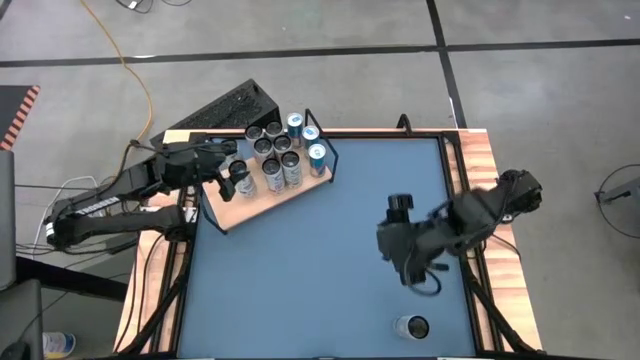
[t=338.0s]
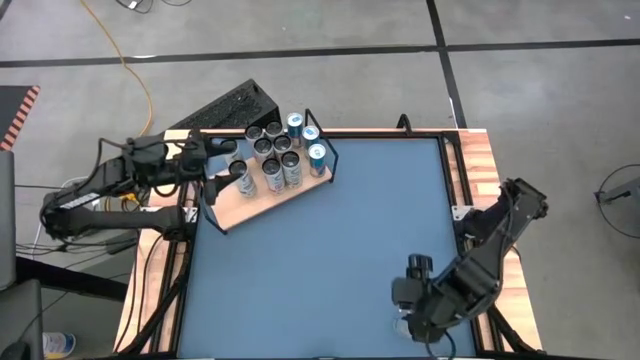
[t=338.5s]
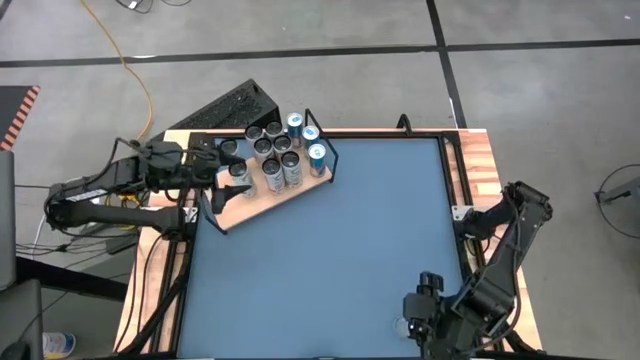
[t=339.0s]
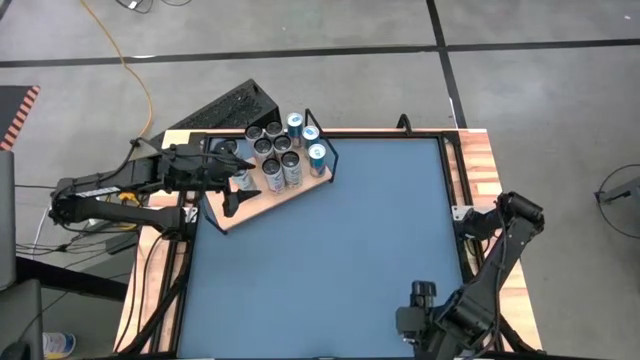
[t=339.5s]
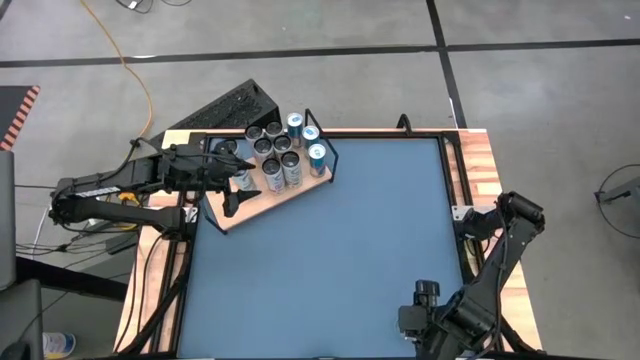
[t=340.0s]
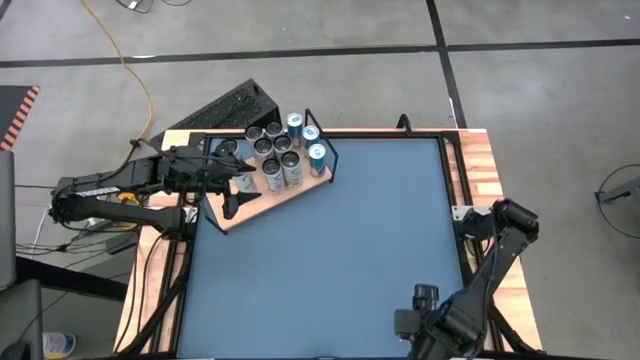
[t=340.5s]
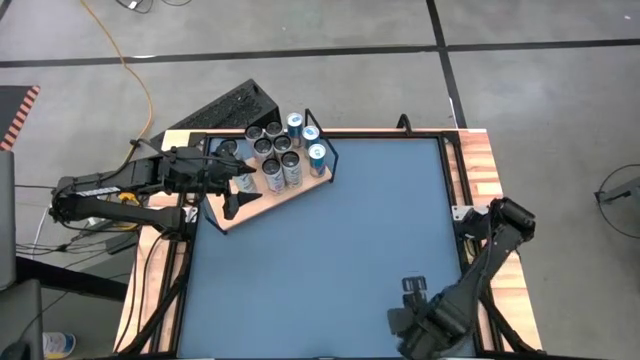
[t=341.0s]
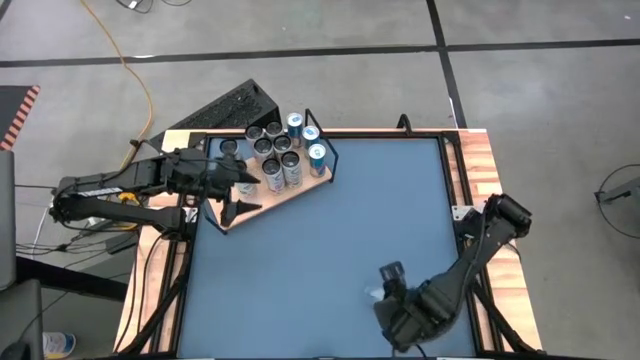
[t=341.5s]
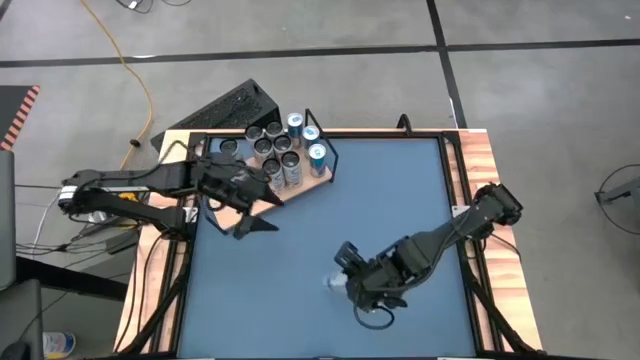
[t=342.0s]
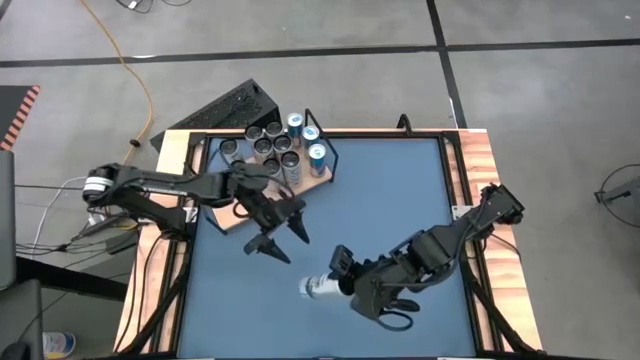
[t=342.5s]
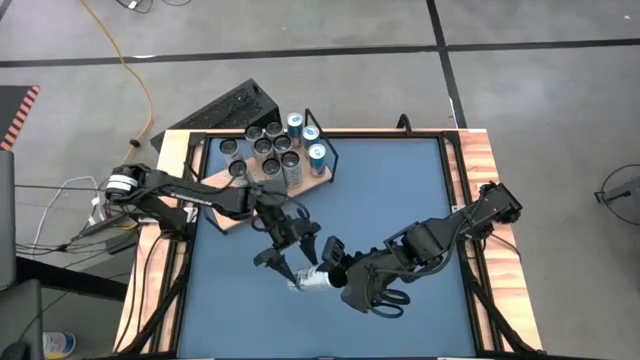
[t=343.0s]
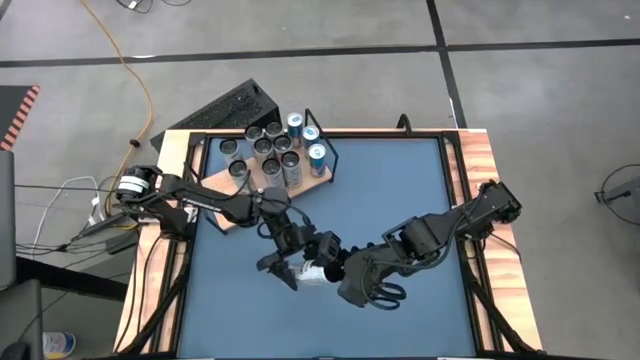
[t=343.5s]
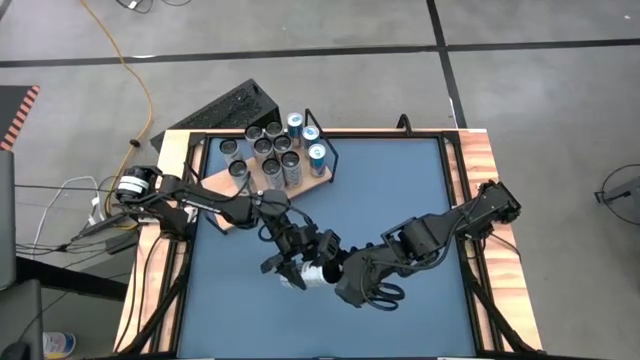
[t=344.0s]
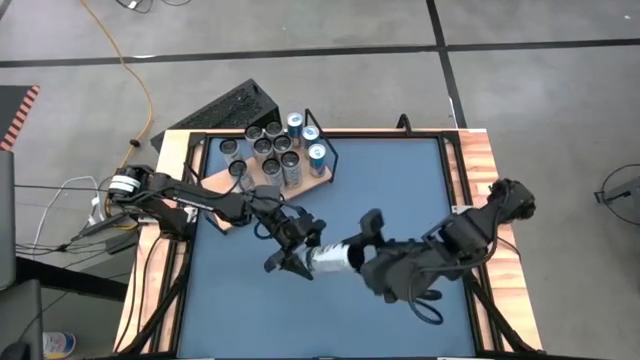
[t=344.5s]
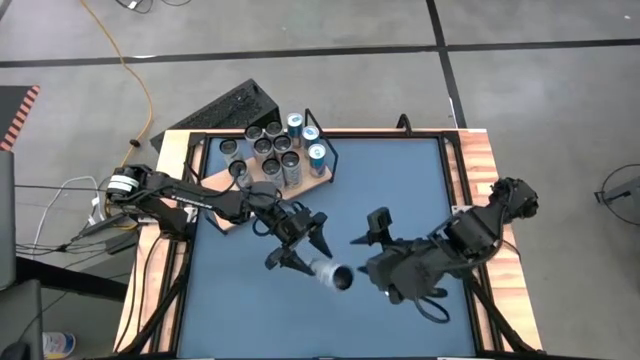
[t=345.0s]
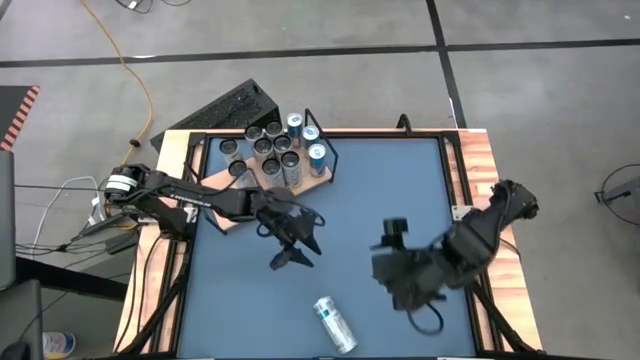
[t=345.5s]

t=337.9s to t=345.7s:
Task: Place canned beverage on shelf
Put the white and blue soda can on the shelf aligned with the other white and blue soda cans

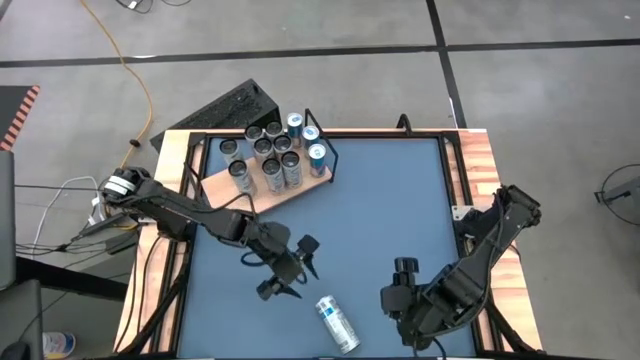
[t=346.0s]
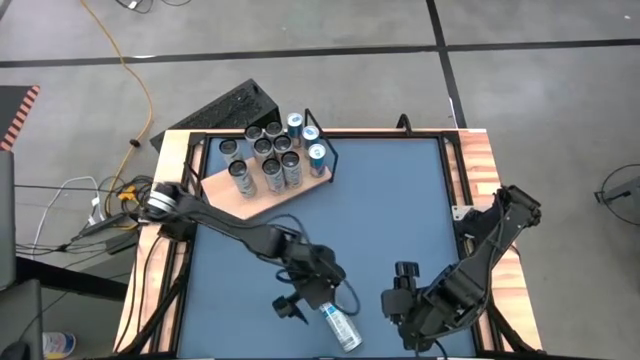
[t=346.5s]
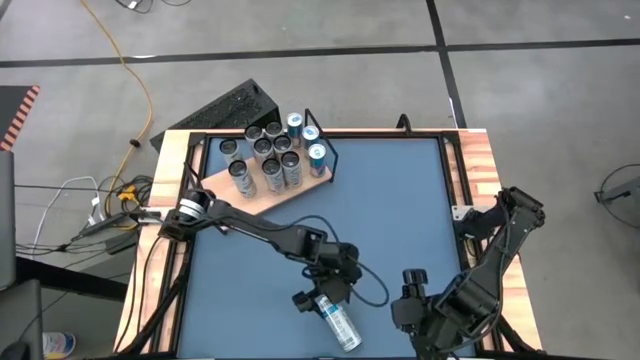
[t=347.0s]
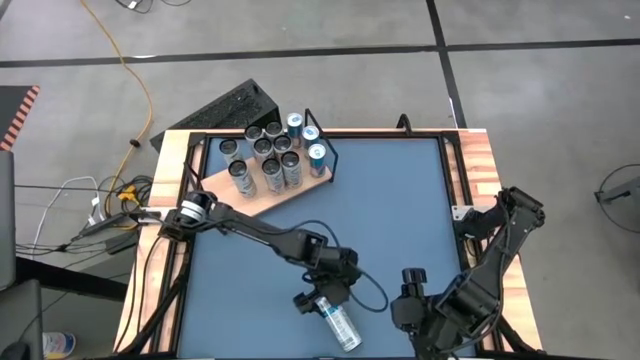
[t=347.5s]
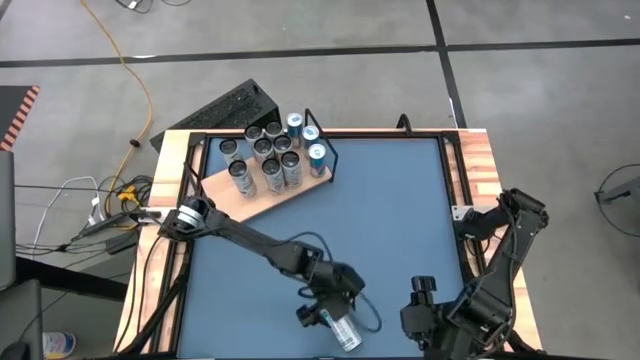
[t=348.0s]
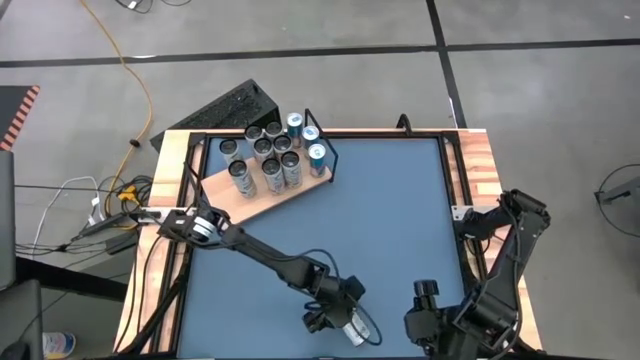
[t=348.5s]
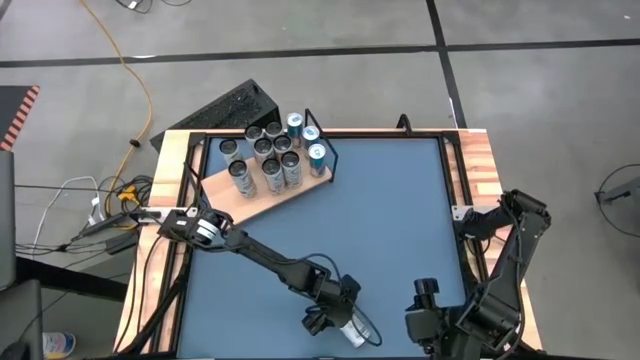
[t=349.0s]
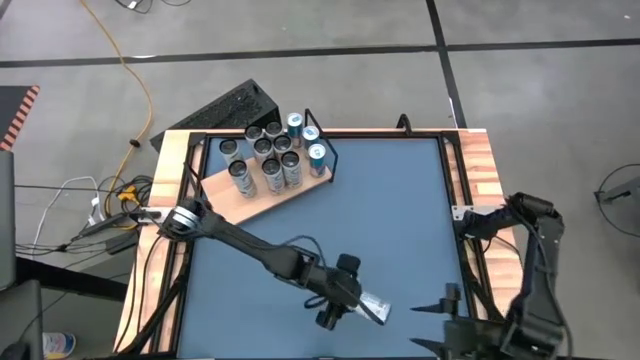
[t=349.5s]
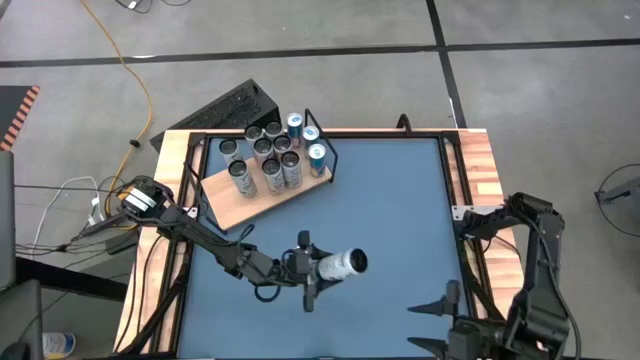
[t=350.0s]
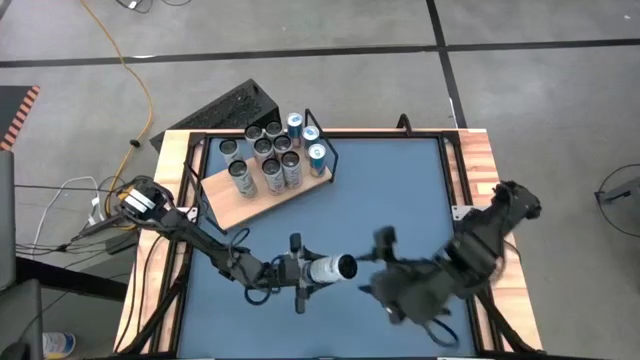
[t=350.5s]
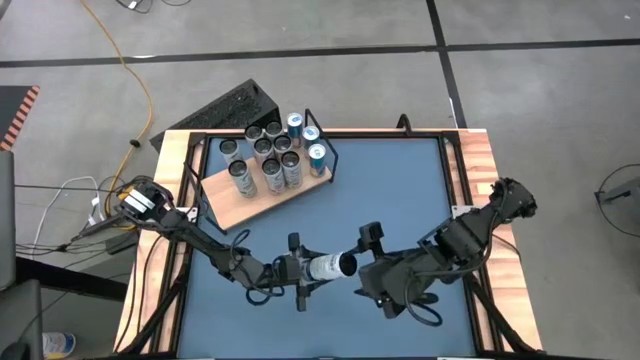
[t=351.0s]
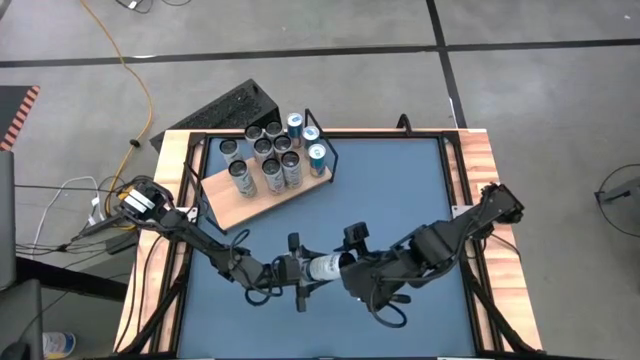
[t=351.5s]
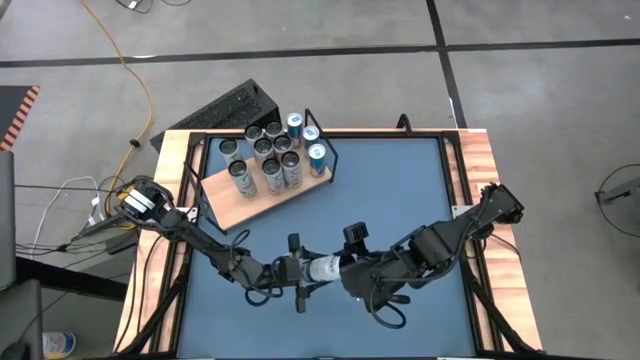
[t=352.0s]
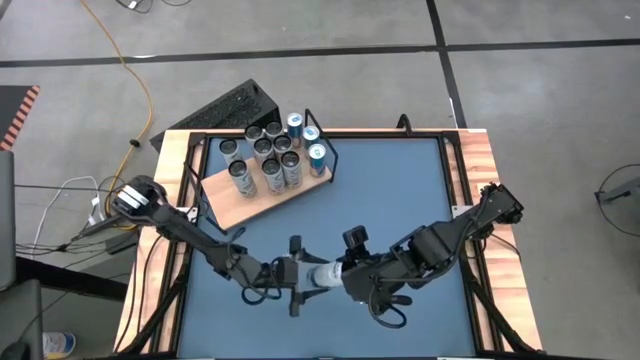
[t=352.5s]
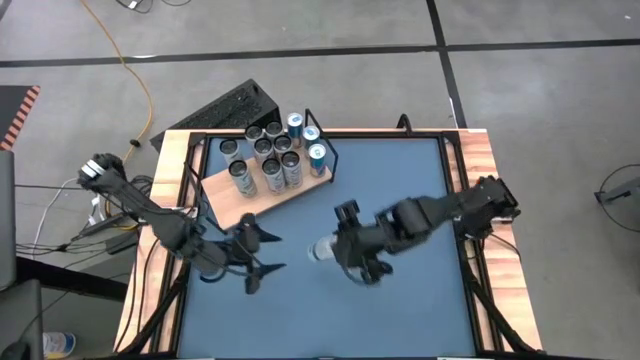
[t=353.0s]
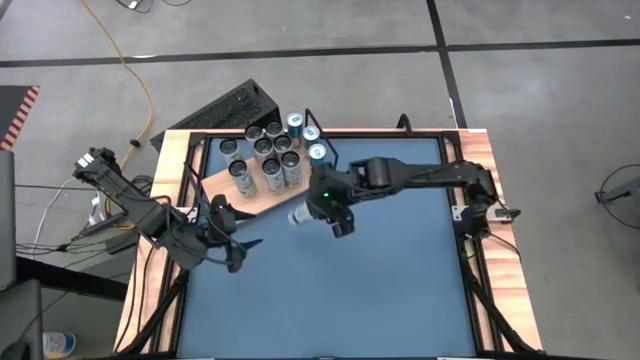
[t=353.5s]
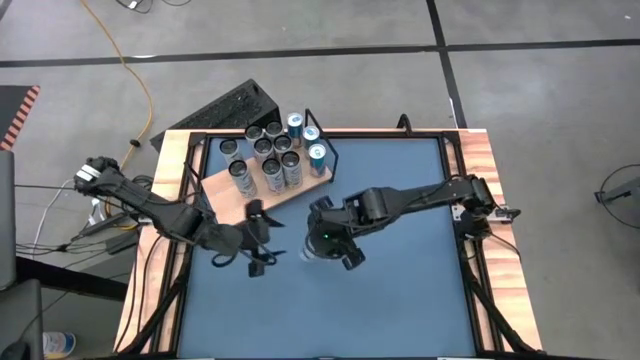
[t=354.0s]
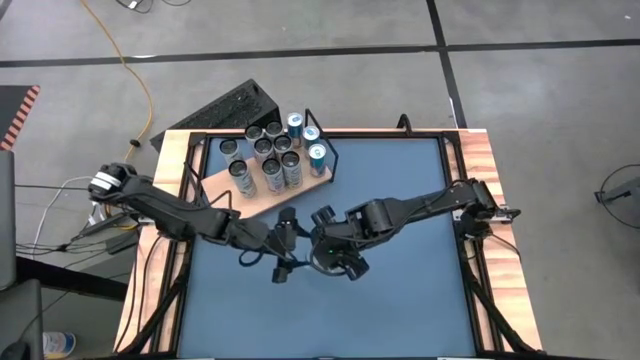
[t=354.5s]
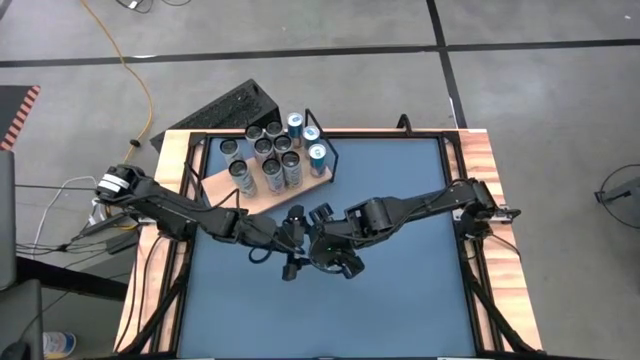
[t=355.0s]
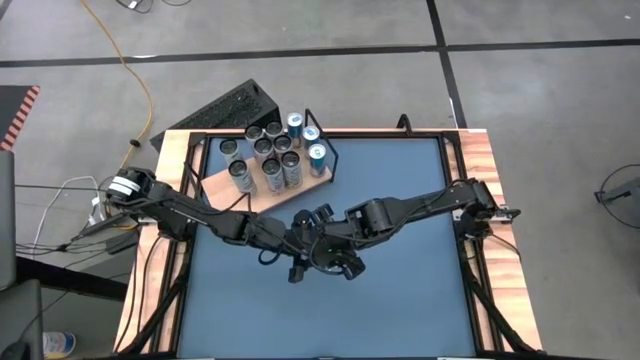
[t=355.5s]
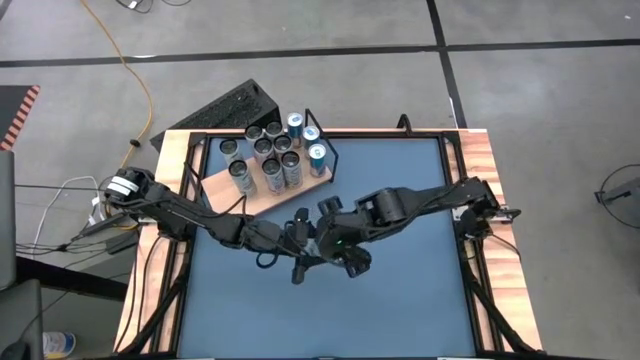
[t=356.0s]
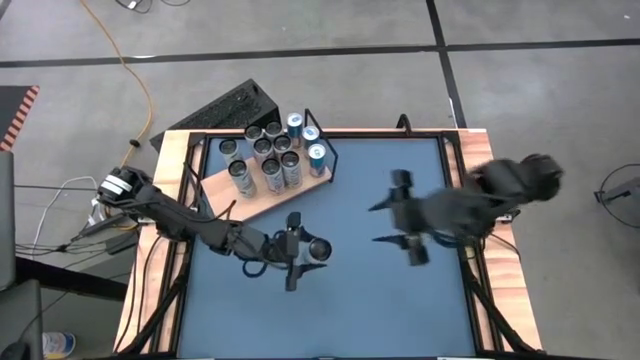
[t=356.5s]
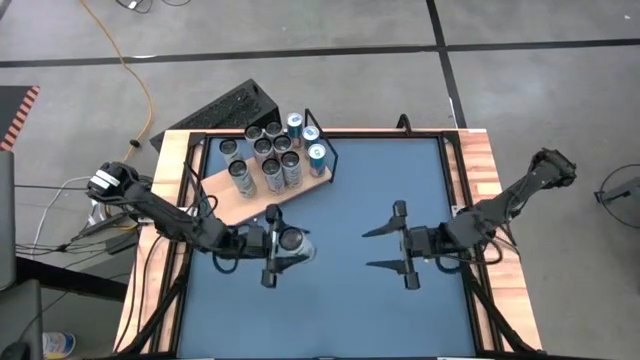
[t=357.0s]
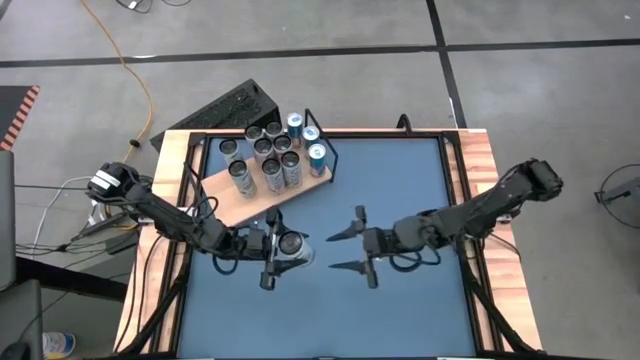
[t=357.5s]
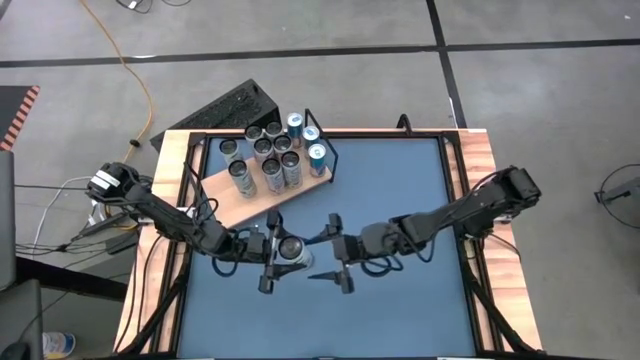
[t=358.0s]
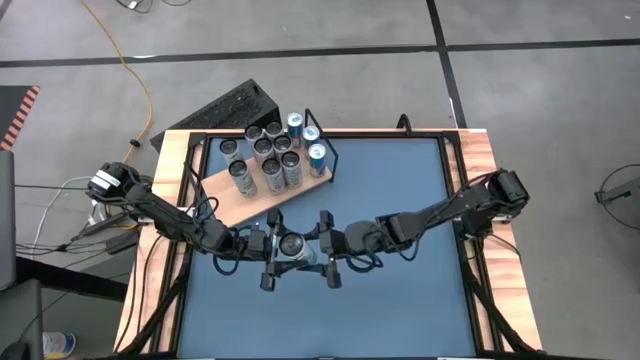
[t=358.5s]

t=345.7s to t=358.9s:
Put the white and blue soda can on the shelf aligned with the other white and blue soda cans

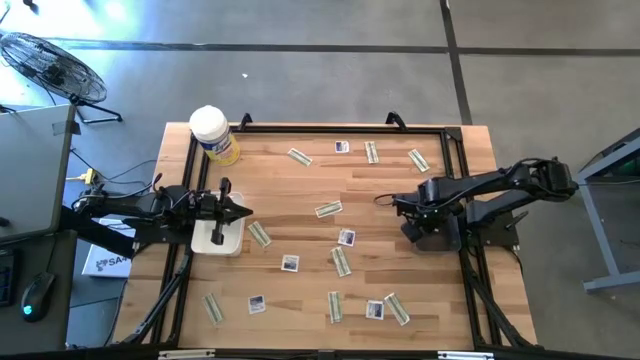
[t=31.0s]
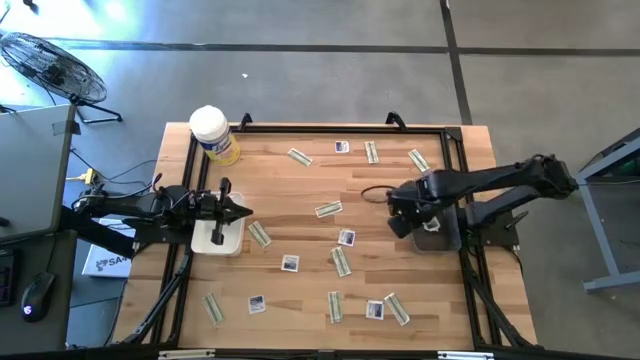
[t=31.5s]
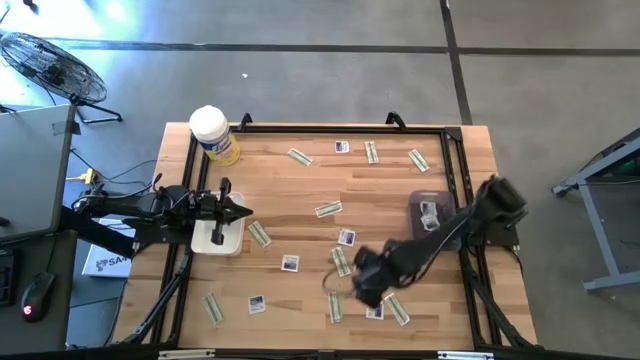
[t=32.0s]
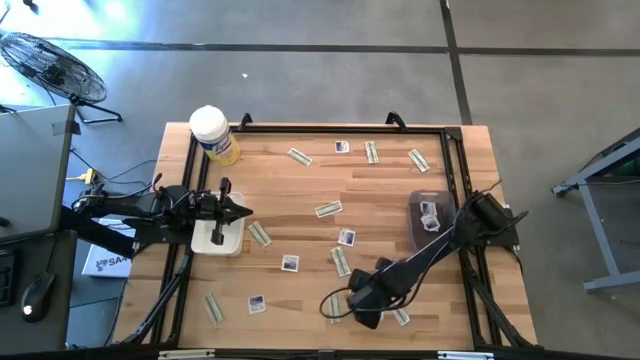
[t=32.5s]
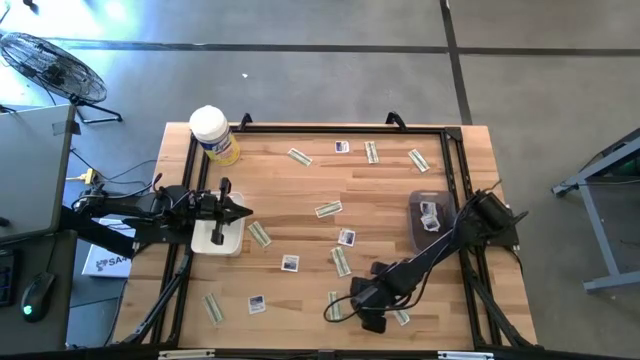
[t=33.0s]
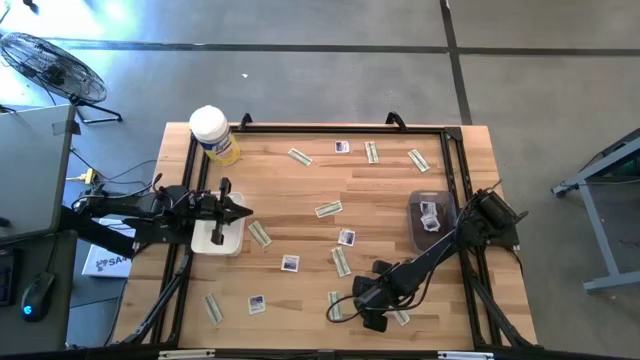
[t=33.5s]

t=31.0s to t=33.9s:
Task: Pick & Place First Aid Supplies
Put the blue alcohol pad into the black bin
